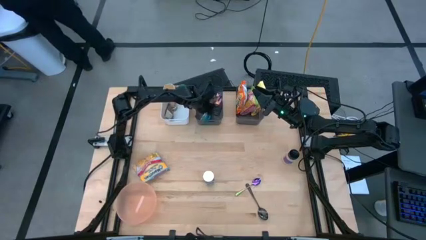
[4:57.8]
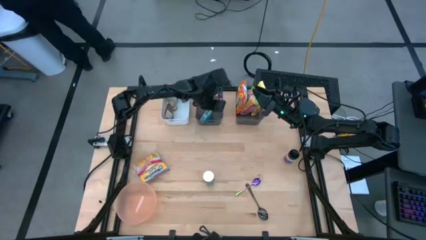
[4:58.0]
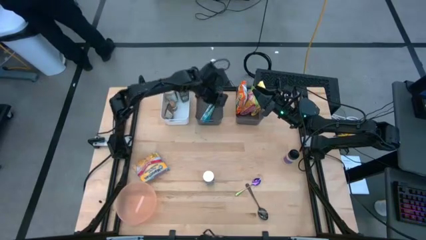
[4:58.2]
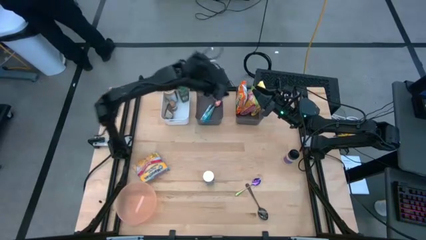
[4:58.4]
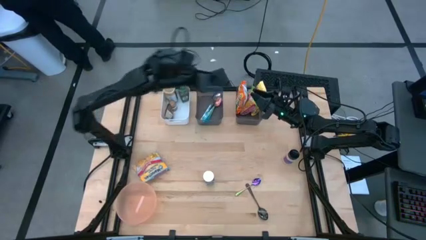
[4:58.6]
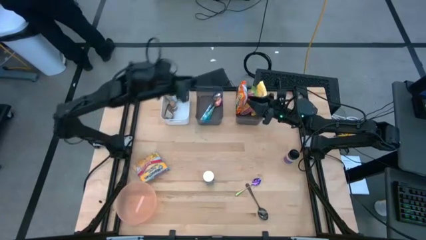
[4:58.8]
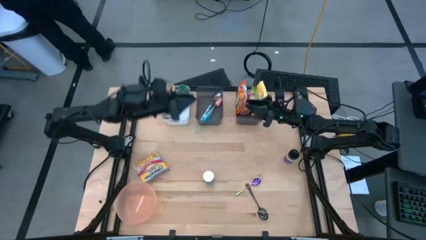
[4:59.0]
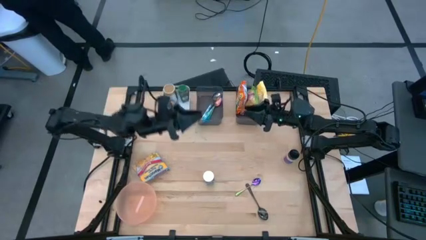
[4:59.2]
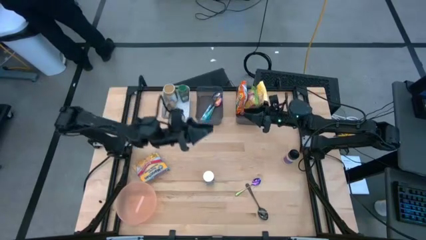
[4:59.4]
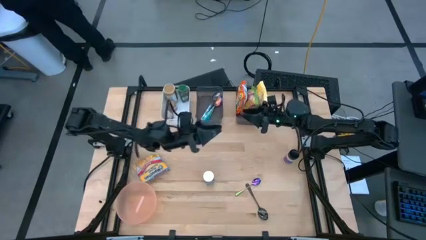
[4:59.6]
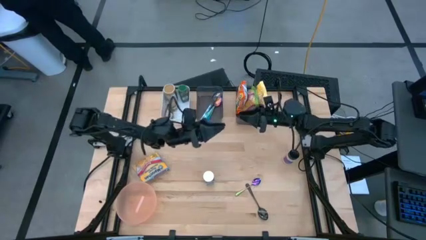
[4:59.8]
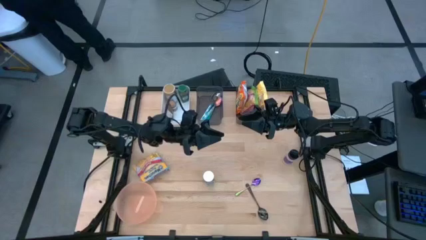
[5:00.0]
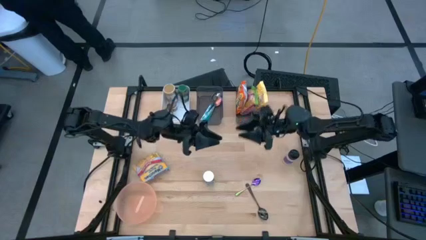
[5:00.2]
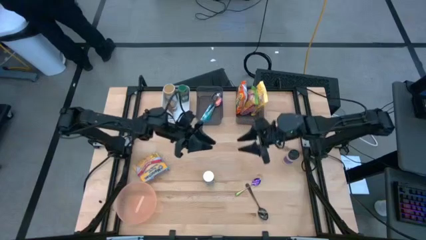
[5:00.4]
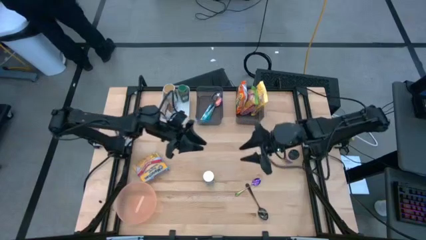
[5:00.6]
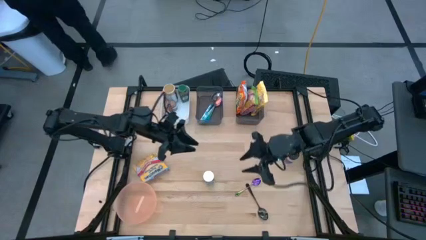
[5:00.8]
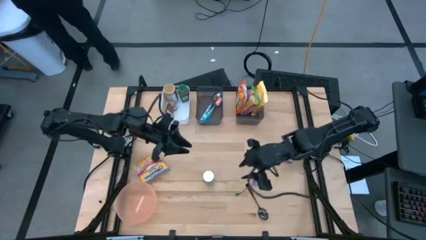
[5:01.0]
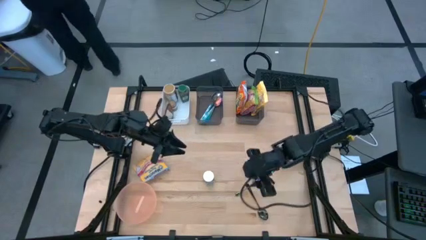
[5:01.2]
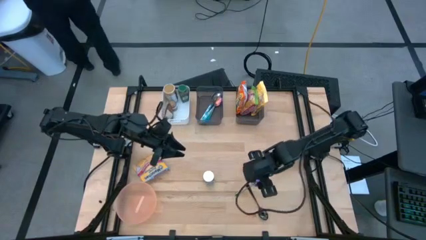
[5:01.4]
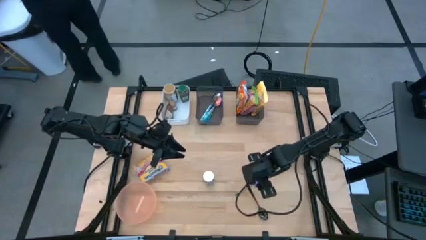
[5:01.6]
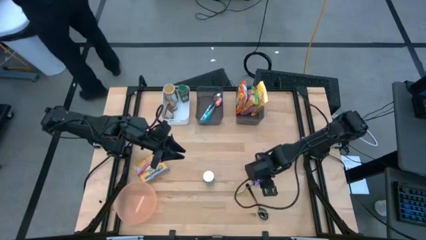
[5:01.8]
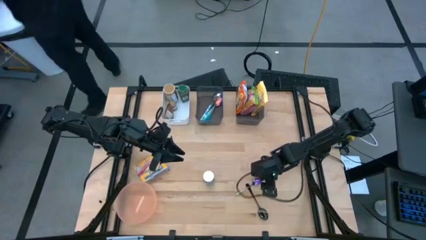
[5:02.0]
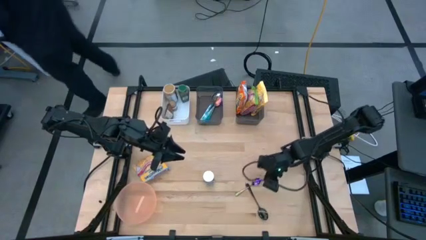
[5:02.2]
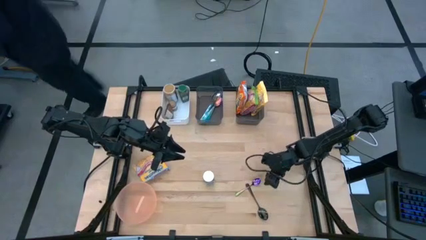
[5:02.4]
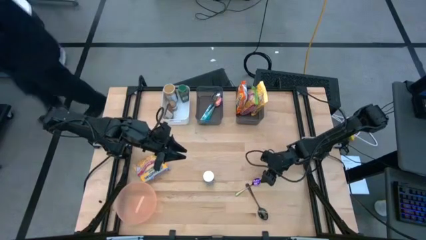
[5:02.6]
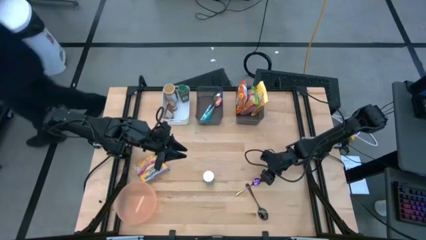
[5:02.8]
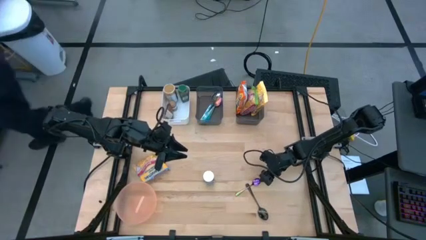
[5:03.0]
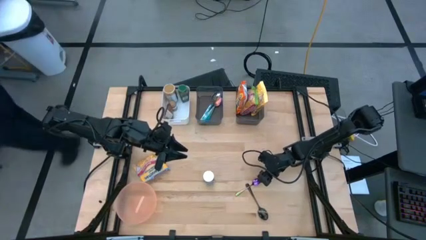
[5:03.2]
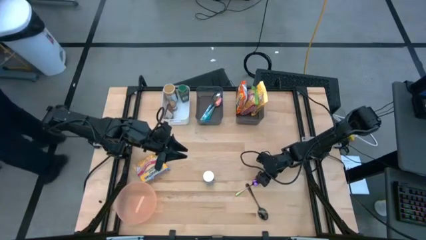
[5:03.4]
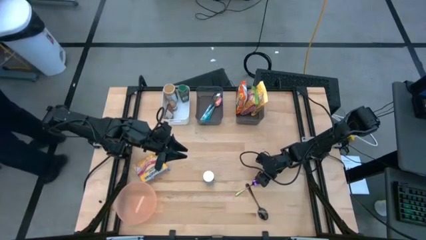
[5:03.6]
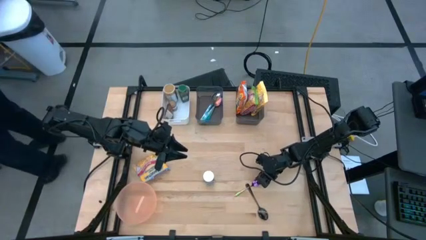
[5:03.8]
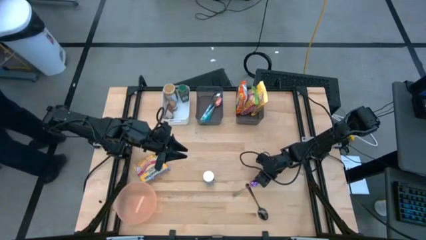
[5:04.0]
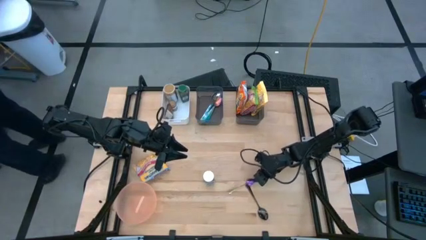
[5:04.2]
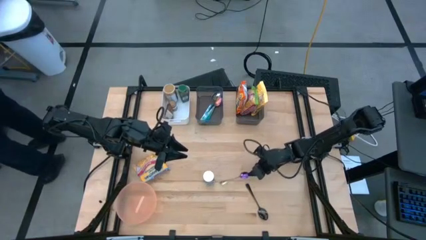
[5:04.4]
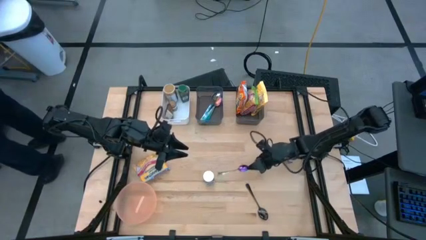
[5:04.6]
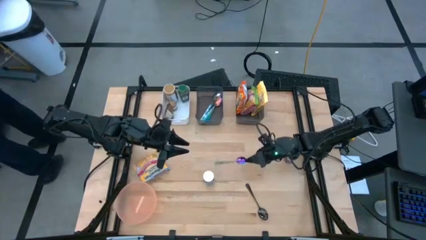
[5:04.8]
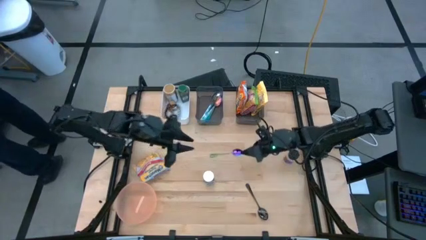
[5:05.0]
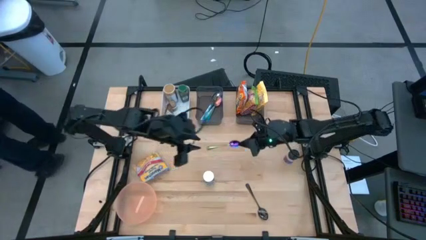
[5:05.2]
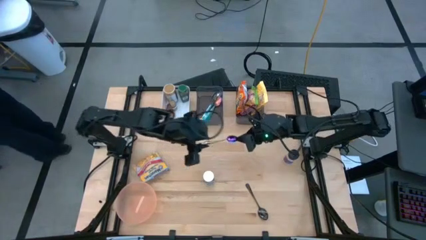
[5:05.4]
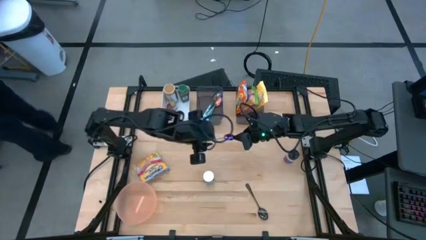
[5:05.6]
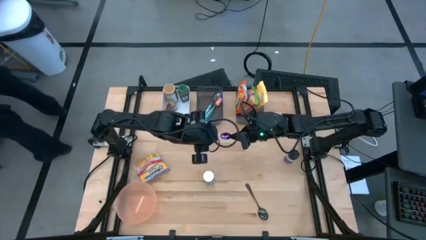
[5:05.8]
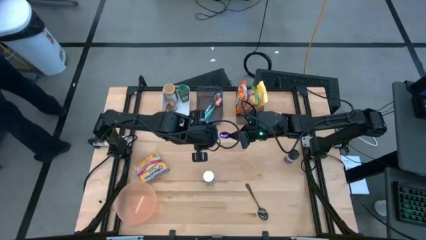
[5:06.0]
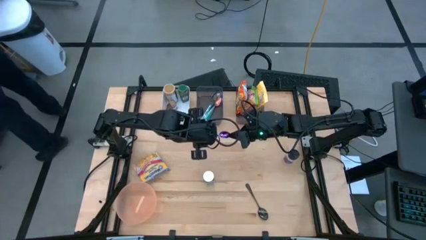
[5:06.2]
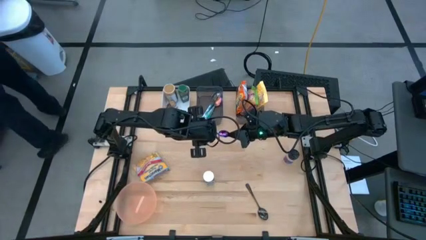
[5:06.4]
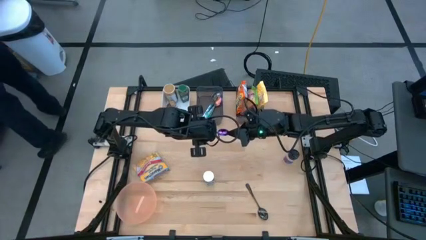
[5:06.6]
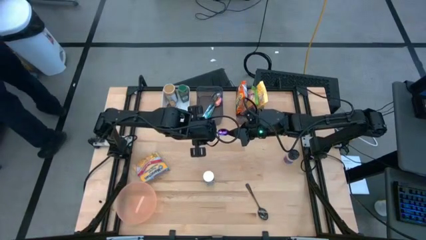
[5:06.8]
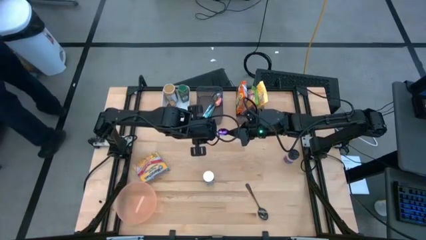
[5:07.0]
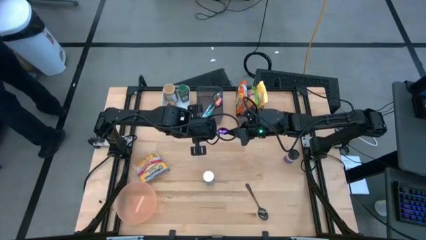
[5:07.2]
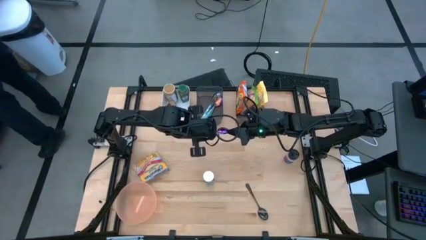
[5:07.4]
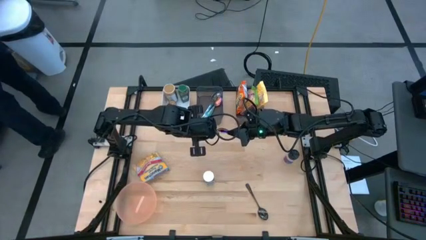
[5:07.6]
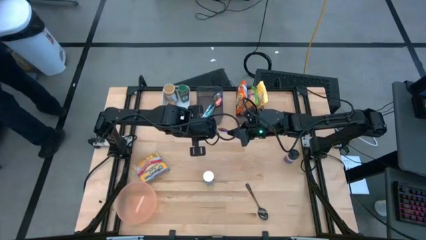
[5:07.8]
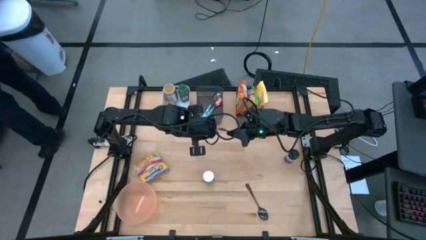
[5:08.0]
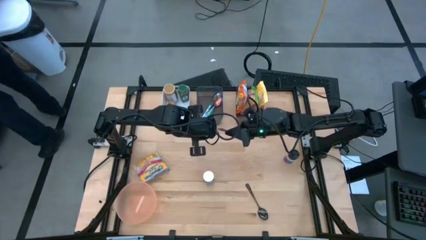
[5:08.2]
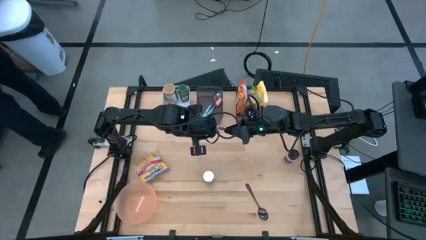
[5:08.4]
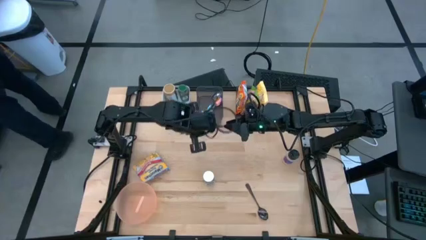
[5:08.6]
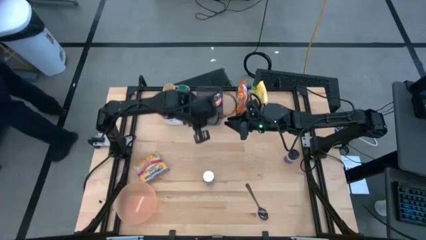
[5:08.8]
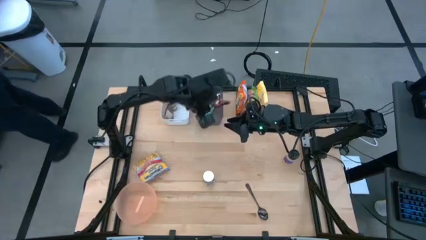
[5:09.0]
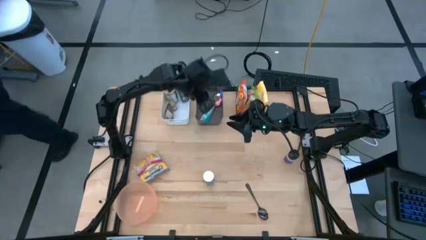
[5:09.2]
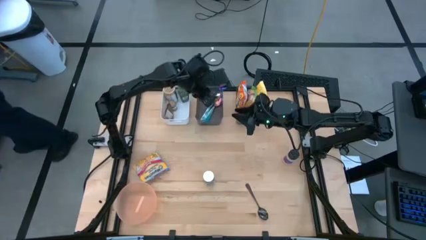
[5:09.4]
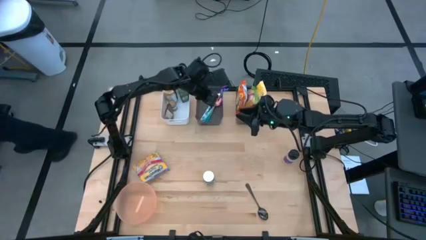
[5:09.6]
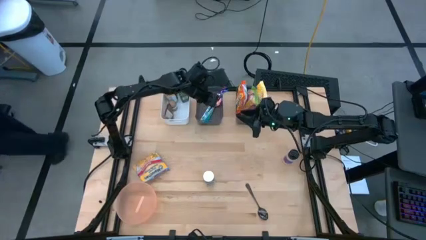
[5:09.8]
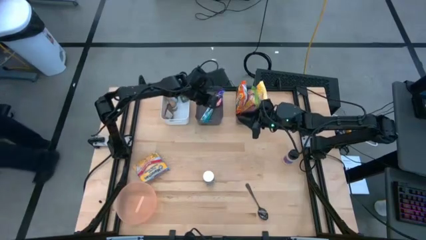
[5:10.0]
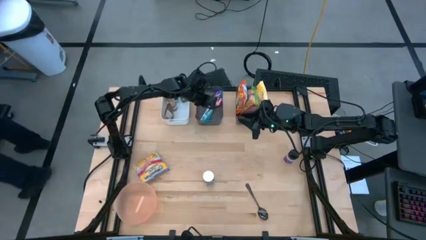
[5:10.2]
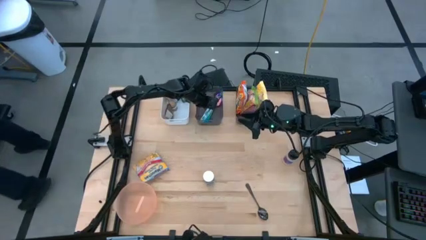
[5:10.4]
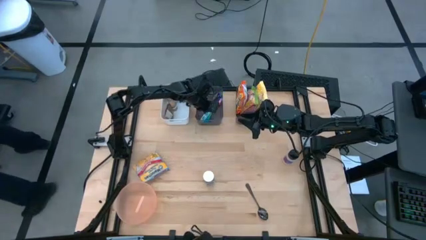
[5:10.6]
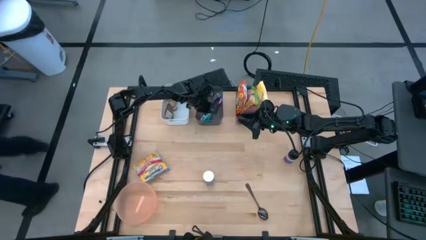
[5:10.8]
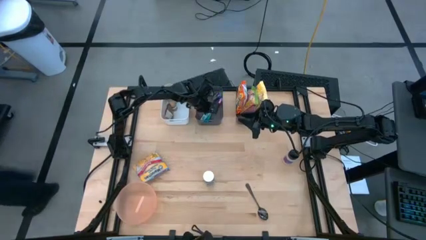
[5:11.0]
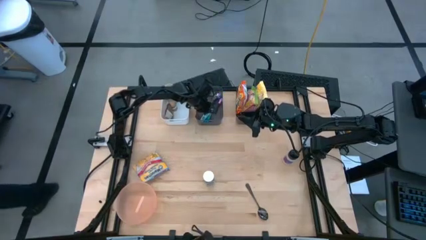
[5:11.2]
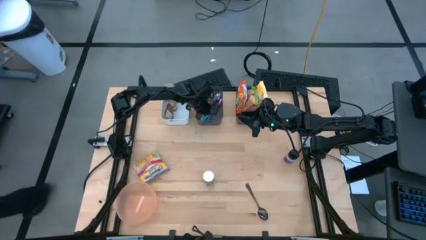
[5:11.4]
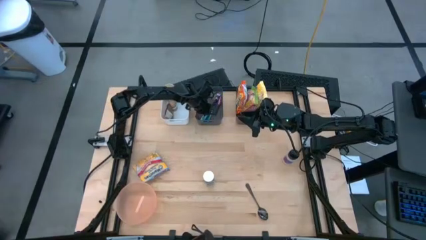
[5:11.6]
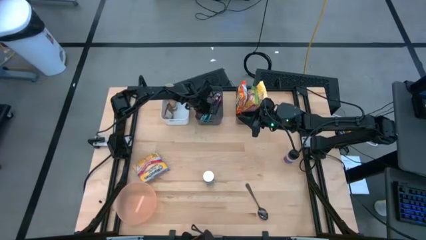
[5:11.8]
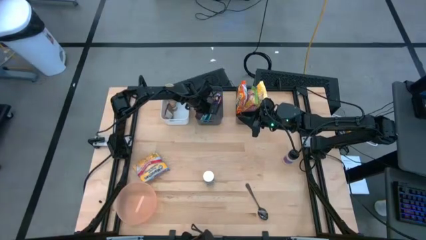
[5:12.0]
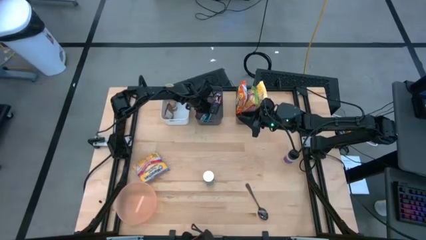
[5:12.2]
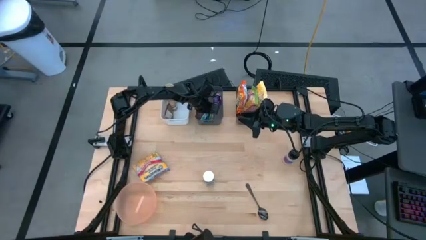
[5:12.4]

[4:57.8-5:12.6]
Task: Pick & Place Food Item
Put the violet spoon into the left black bin

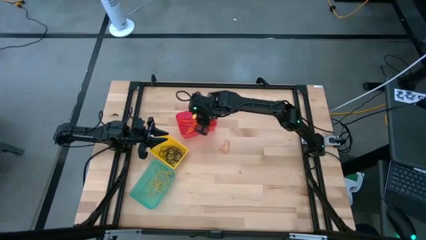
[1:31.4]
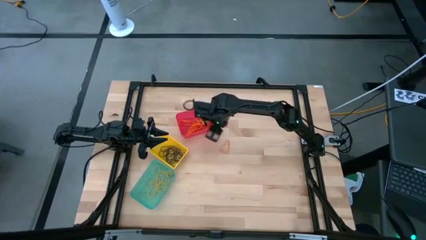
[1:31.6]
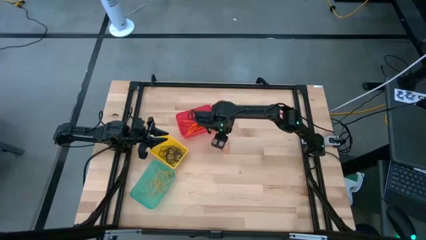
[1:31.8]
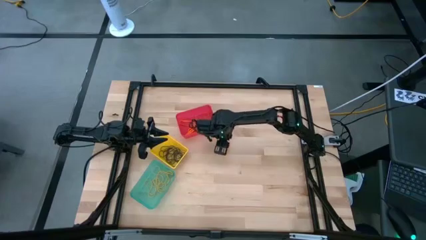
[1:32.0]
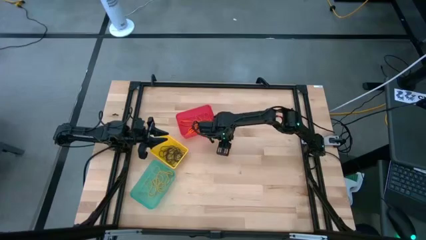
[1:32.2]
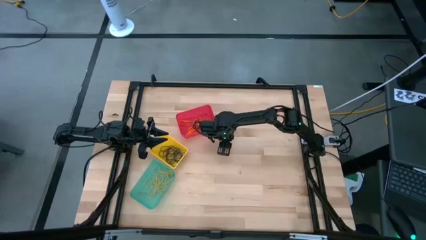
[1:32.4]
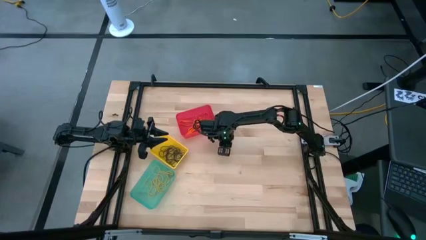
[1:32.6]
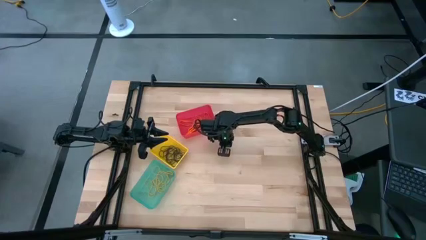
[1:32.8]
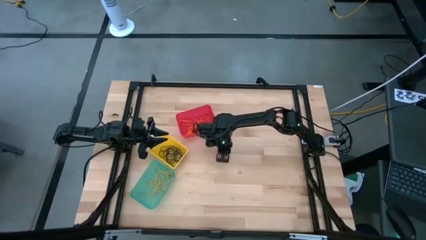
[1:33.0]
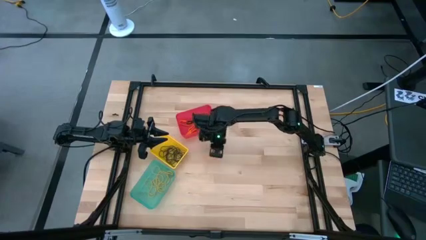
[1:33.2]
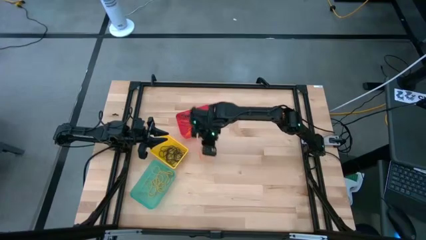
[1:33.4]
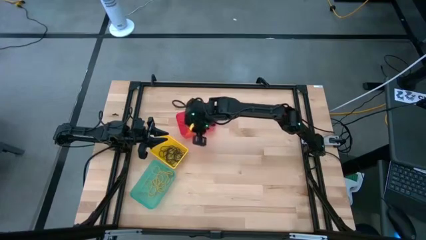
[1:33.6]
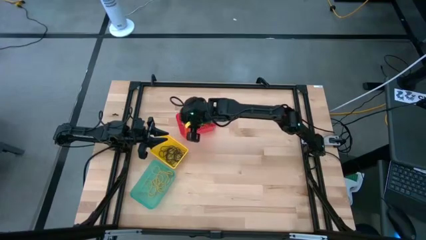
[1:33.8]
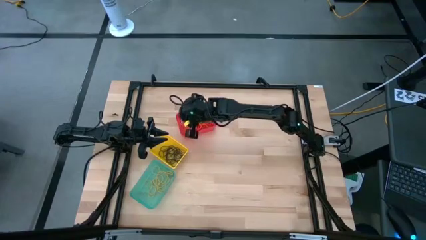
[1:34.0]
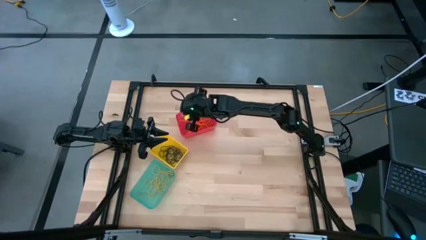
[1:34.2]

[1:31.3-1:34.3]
Task: Sort rubber bands into baskets
Put the orange rubber band into the red bin
